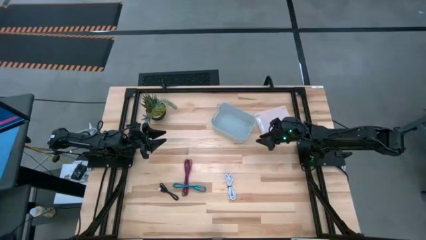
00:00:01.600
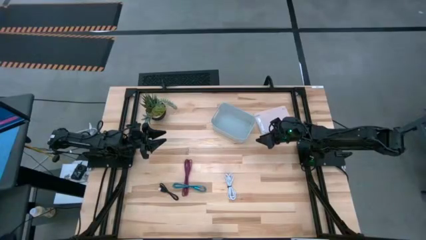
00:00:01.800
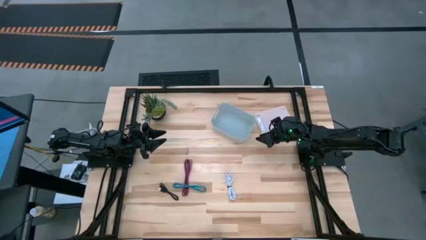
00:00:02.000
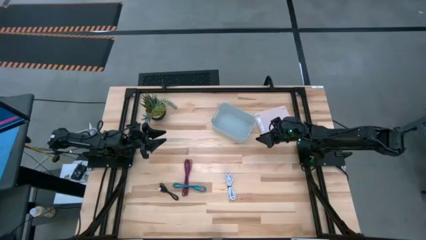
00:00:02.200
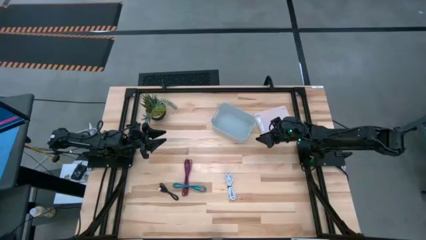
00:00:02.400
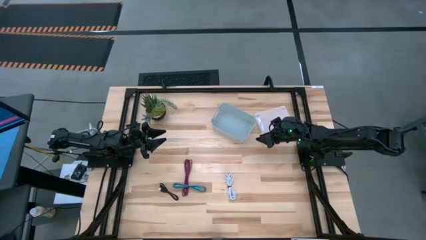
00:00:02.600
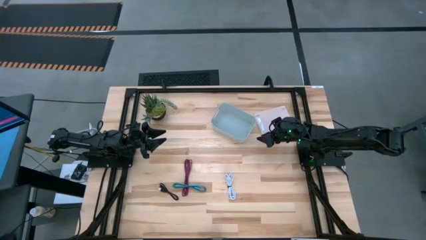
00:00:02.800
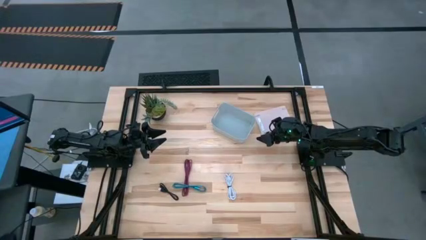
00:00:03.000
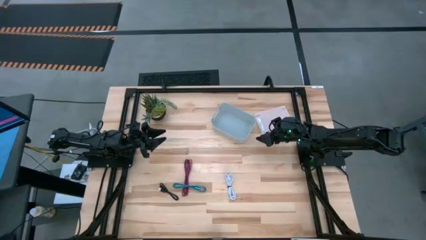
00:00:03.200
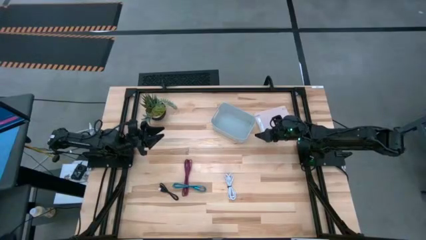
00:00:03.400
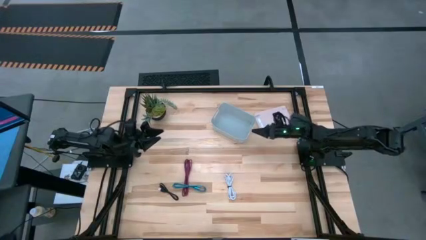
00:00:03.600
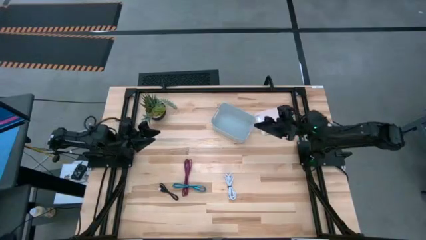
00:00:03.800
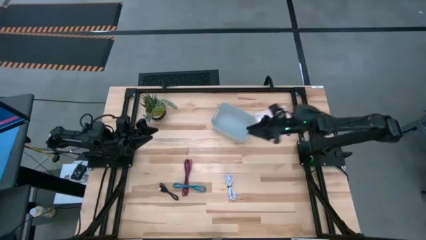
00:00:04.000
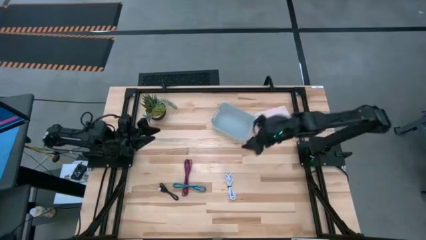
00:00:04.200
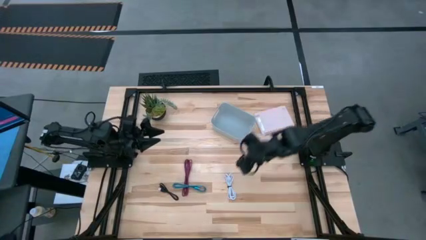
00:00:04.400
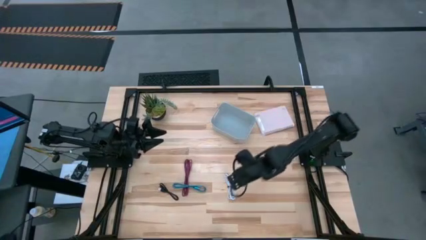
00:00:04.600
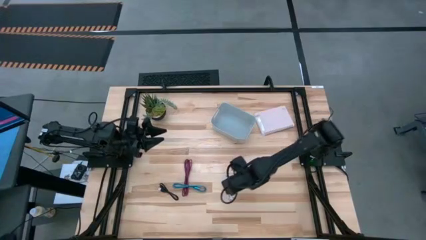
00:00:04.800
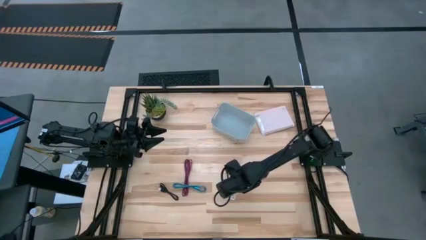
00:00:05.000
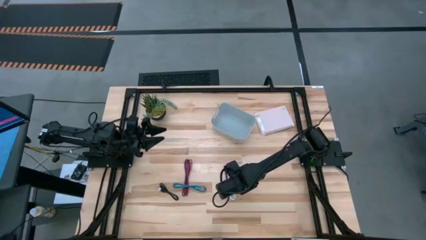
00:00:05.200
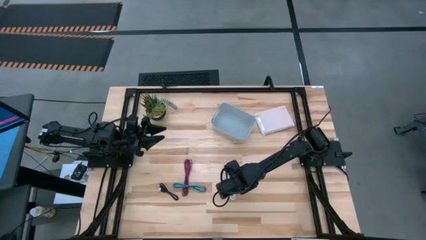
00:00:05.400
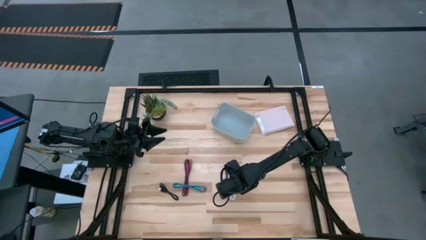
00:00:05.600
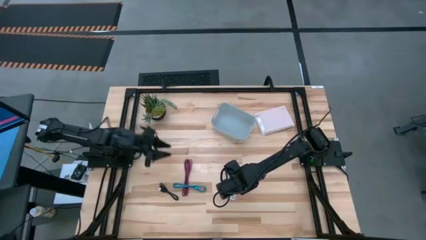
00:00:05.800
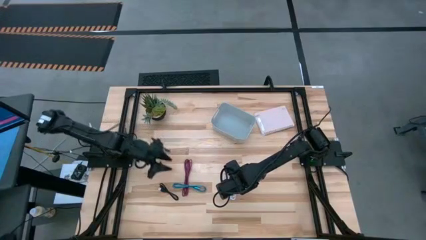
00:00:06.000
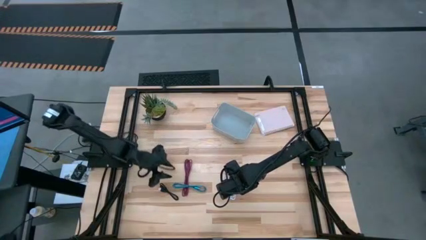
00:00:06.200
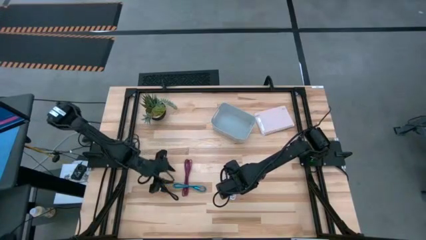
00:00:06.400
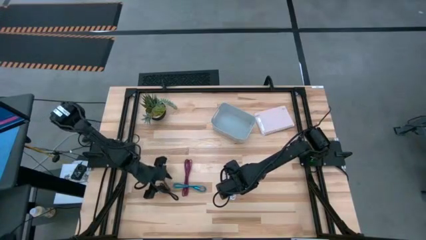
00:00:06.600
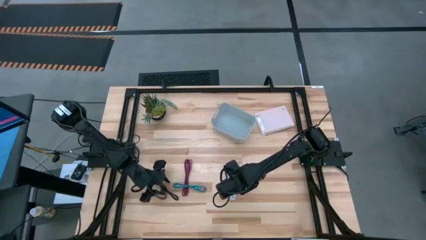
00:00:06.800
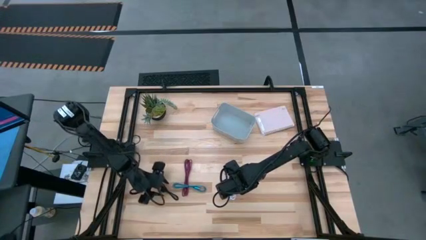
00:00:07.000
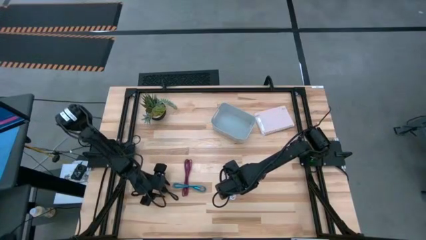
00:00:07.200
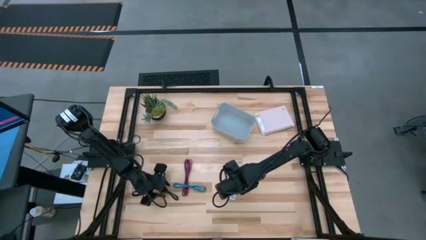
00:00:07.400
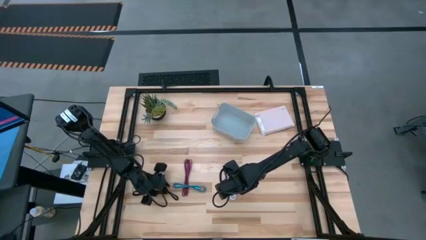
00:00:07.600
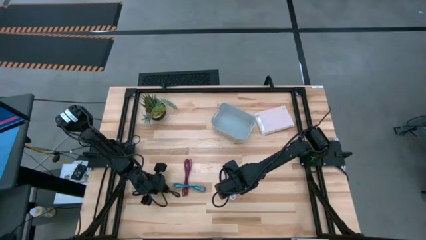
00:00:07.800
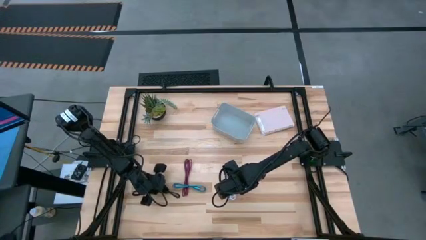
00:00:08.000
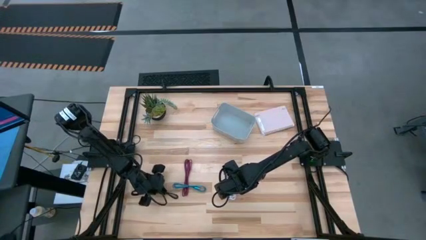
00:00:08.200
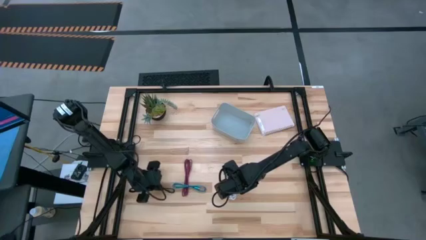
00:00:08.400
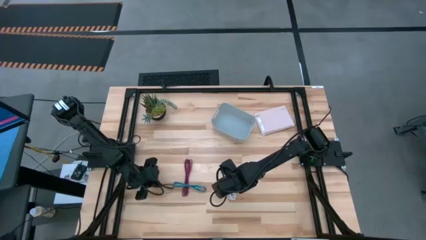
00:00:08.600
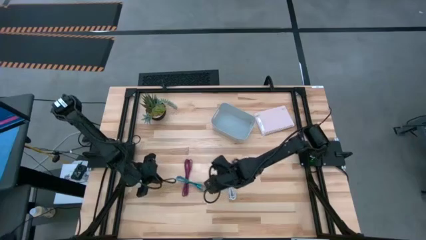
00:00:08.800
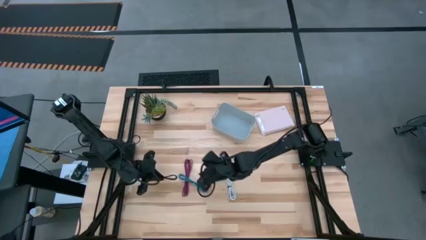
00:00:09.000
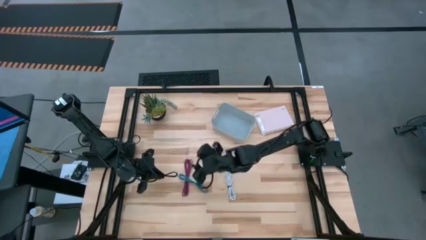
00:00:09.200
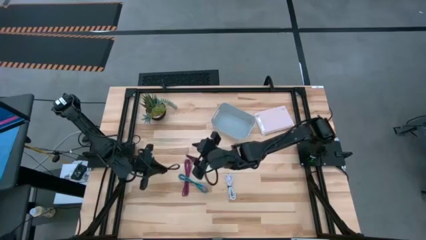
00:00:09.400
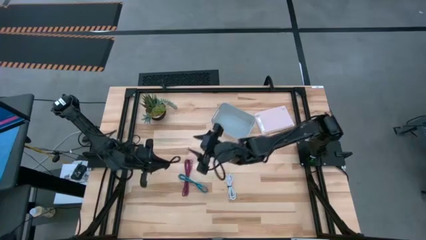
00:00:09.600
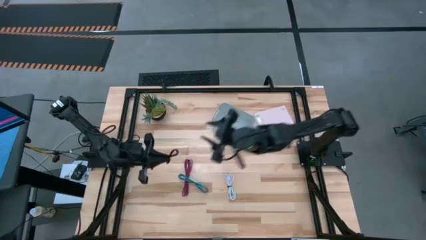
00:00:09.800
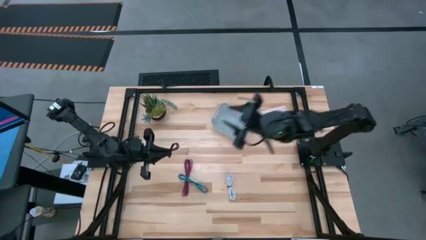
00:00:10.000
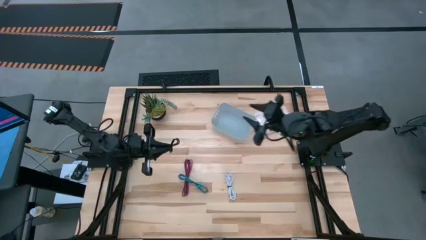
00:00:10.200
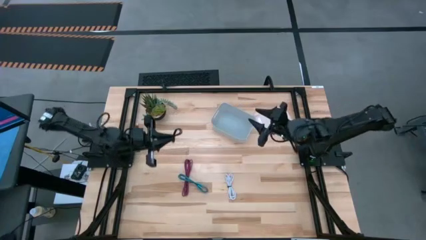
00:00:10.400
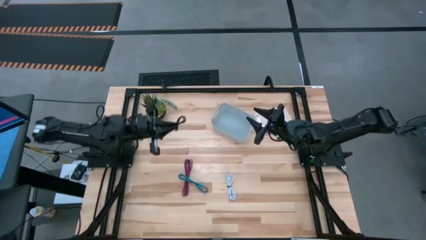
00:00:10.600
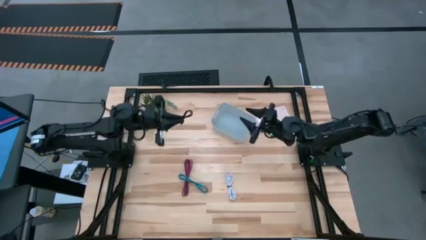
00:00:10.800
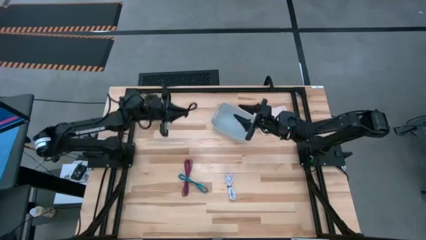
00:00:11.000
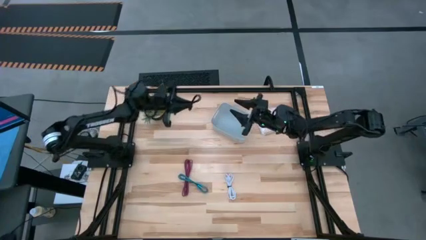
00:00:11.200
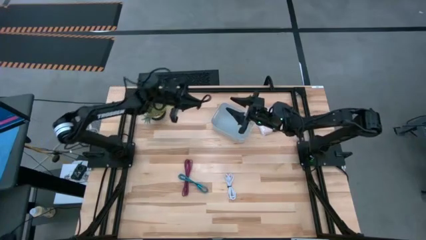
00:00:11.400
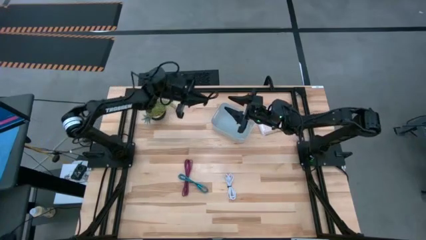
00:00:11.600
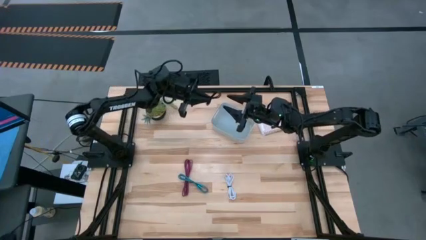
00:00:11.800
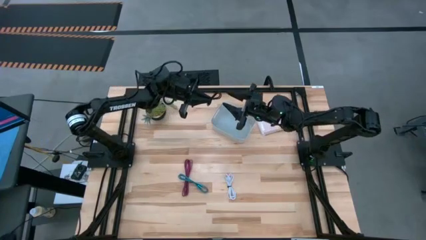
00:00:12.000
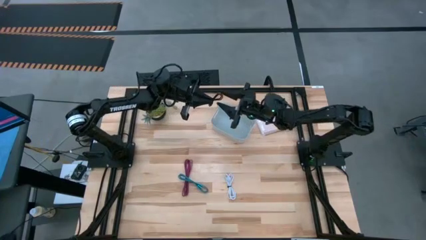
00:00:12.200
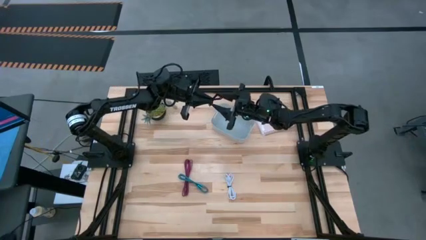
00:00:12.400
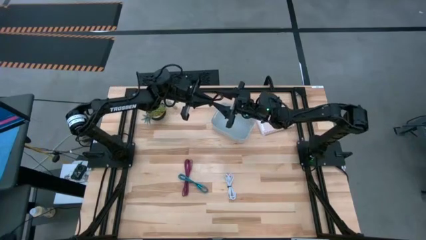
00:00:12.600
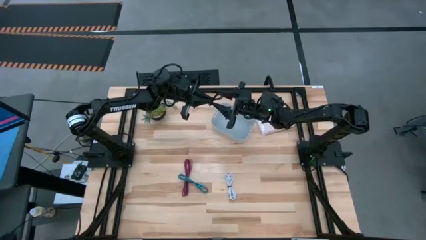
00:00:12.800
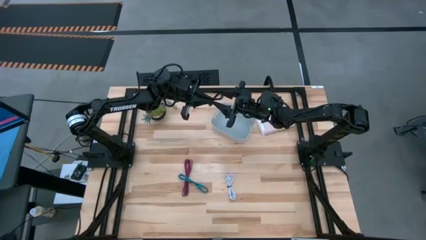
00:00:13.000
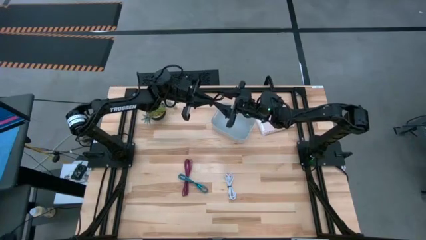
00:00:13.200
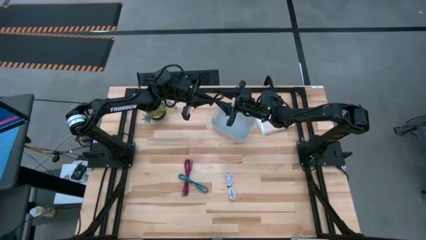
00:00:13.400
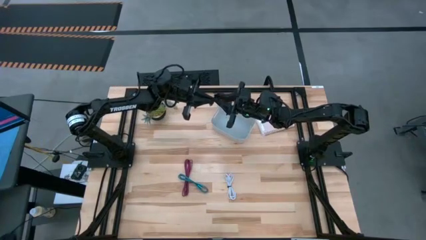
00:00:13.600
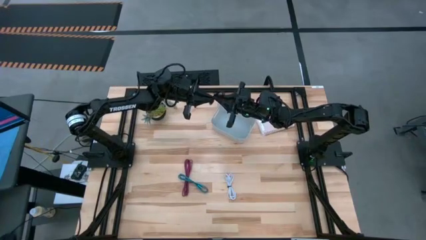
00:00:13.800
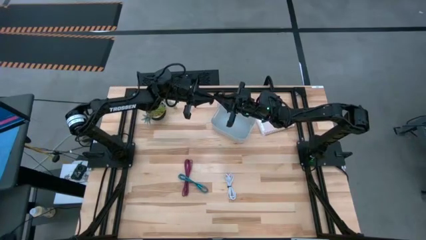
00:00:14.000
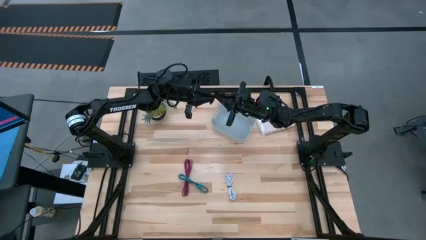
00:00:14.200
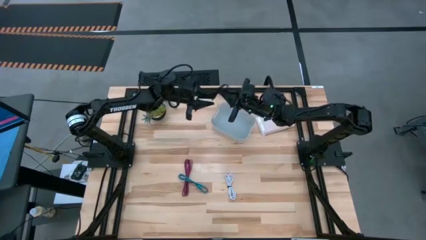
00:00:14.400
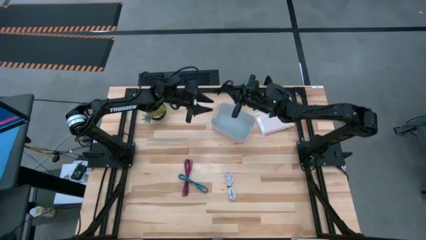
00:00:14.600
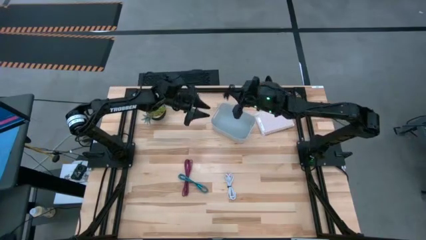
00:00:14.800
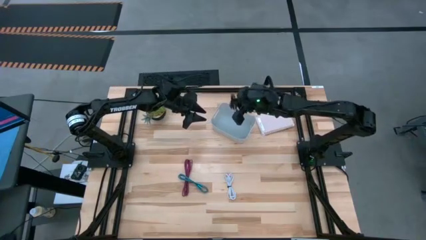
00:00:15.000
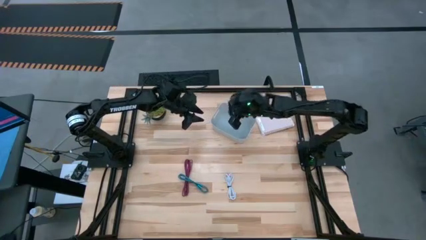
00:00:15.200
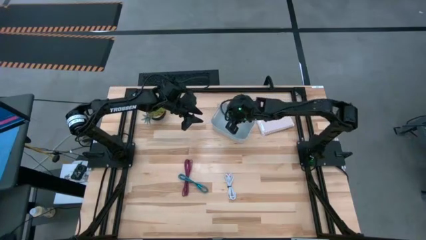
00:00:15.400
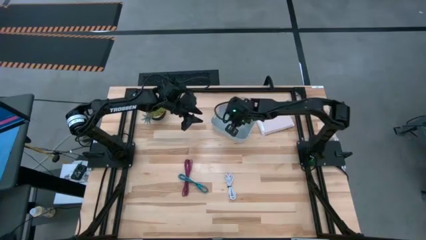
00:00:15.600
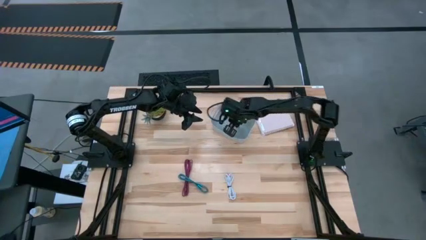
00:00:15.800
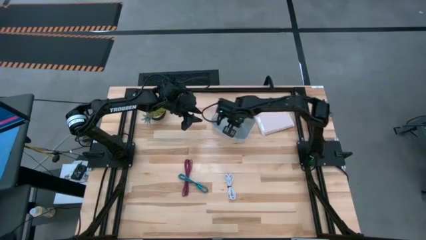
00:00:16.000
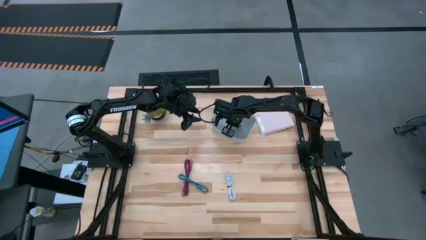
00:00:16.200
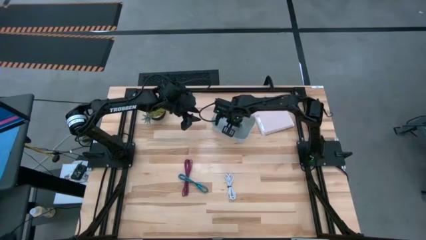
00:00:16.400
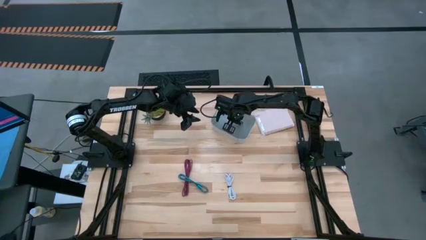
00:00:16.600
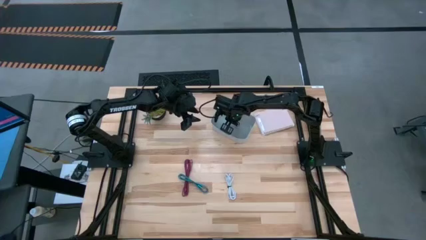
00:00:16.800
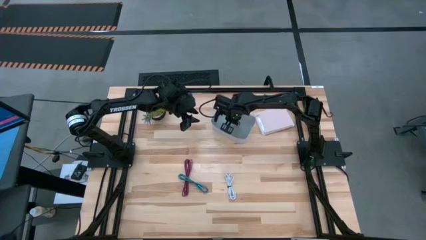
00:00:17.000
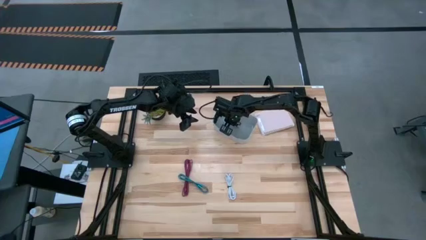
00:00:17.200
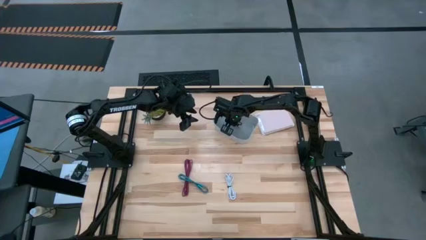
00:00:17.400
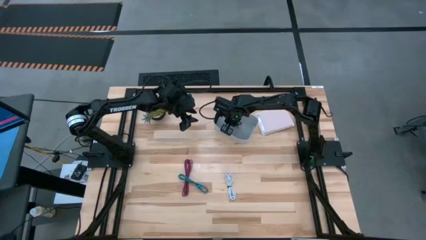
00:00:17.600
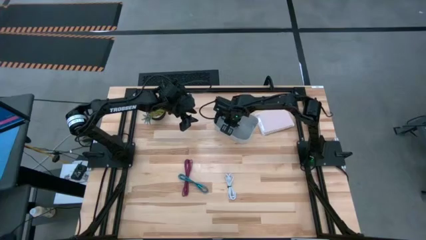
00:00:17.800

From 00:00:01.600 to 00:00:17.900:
Task: Pick and place USB-C Cables
Put the black USB cable into the grey bin
